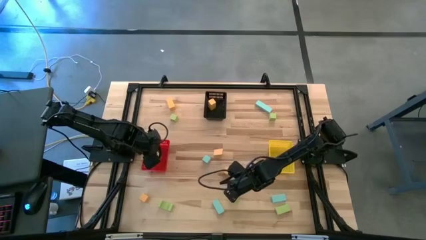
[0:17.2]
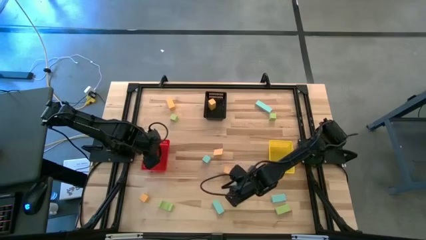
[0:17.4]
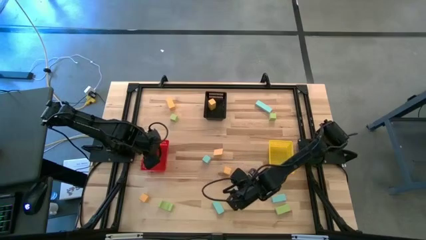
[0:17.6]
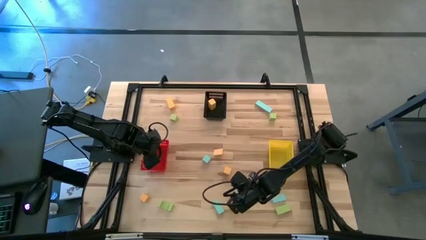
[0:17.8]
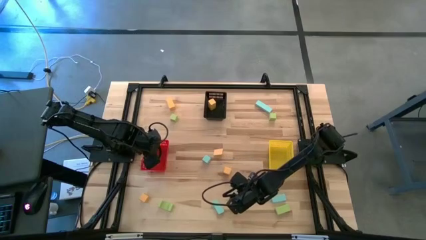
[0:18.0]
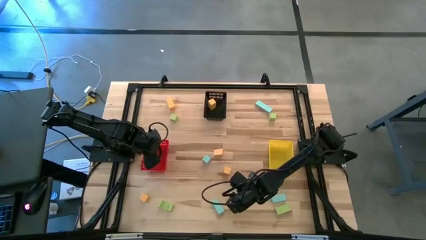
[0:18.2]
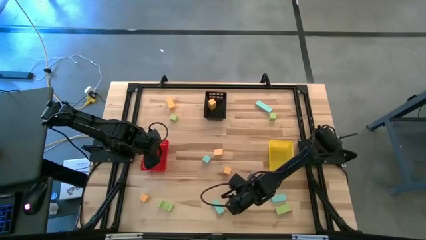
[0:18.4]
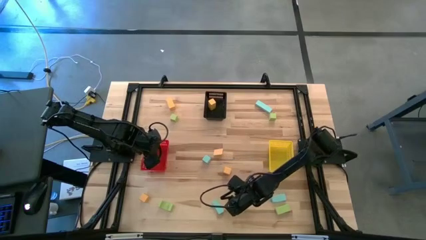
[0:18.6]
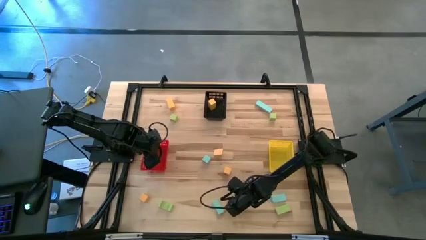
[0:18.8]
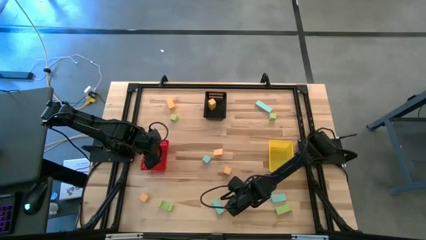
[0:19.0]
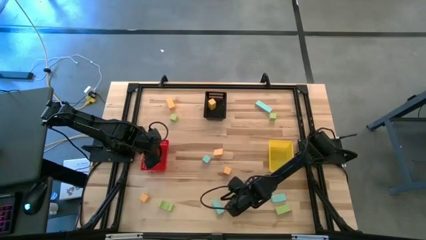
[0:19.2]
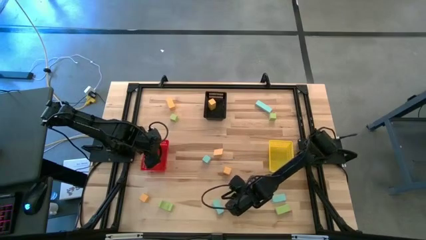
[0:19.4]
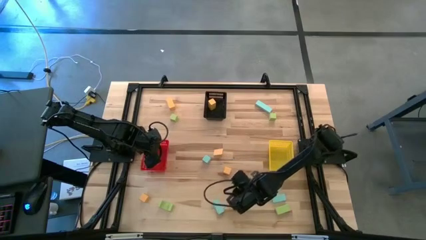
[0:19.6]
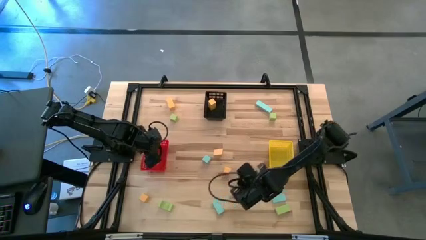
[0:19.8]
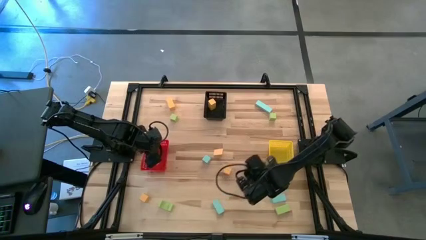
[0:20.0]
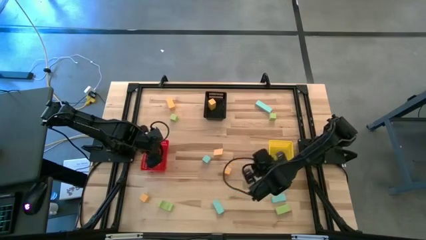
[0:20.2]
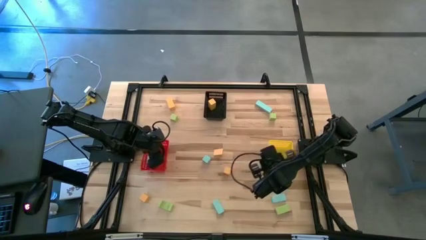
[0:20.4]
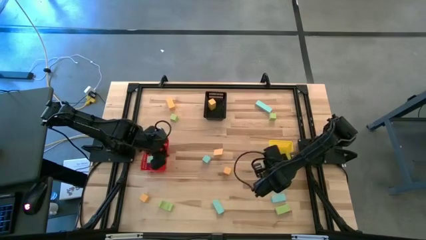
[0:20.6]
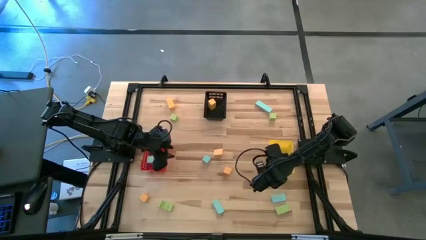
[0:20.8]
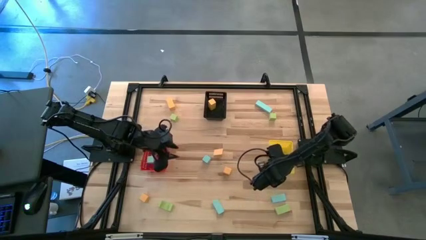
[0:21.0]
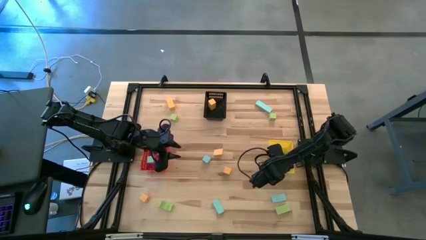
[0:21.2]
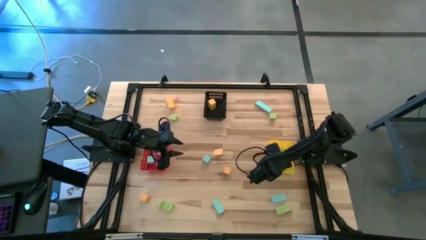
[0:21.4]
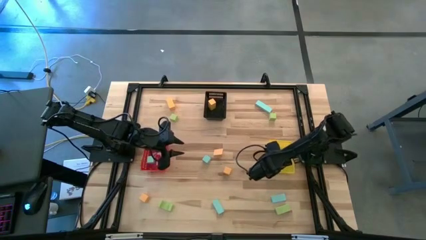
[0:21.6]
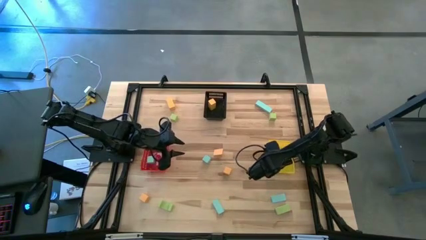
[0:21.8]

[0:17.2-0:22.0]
Task: Sort & place blocks by color
Put the green block into the yellow bin

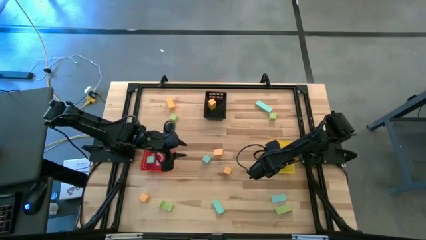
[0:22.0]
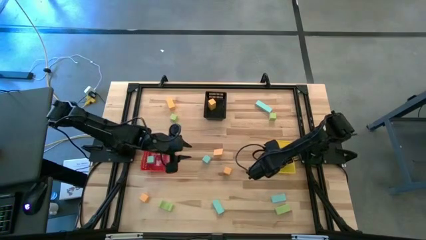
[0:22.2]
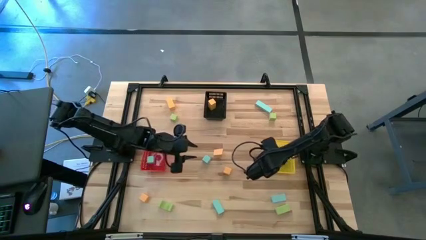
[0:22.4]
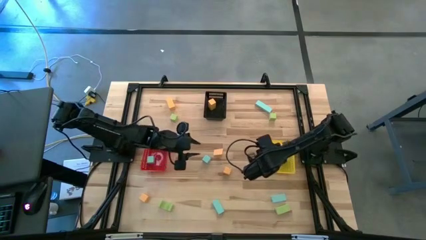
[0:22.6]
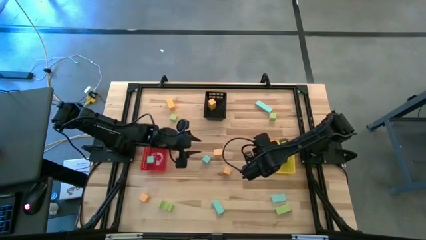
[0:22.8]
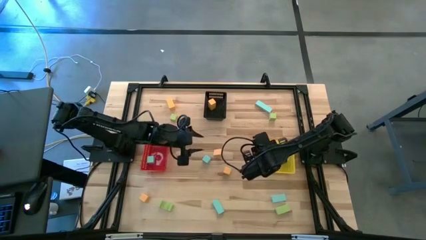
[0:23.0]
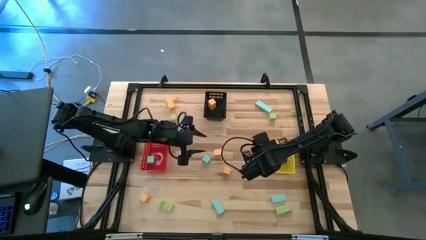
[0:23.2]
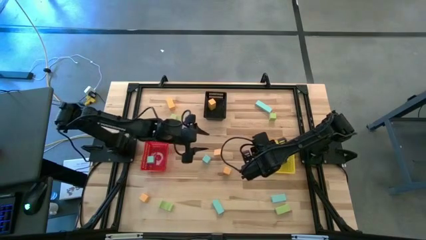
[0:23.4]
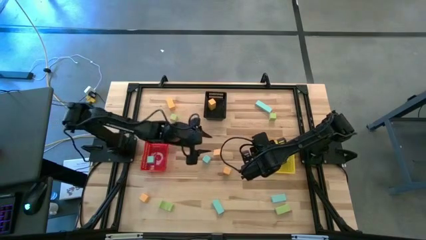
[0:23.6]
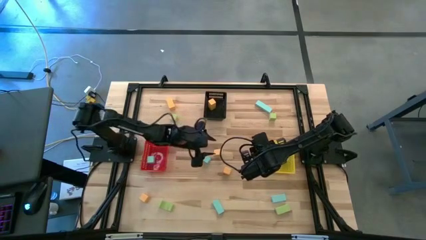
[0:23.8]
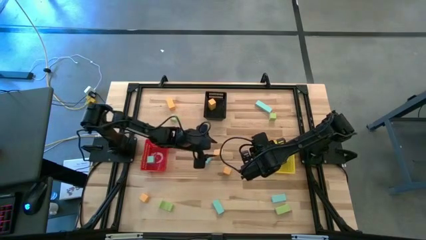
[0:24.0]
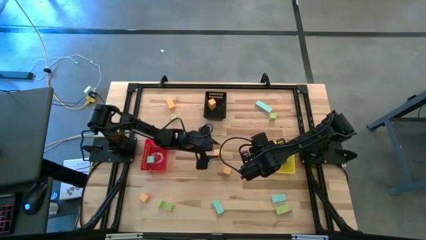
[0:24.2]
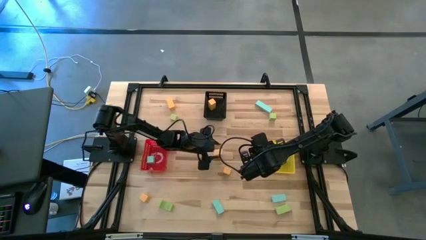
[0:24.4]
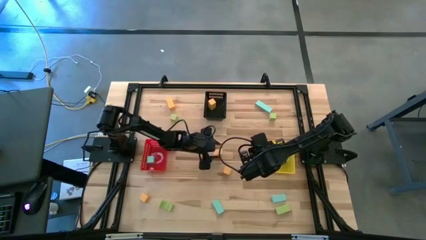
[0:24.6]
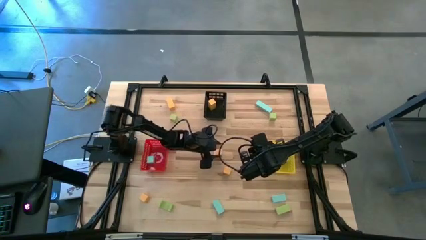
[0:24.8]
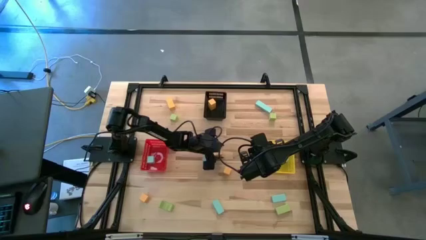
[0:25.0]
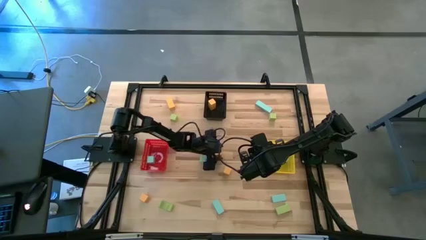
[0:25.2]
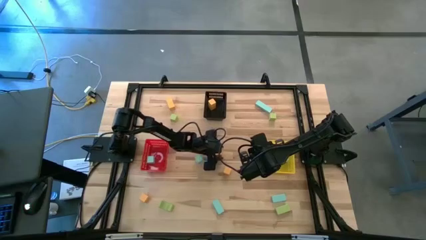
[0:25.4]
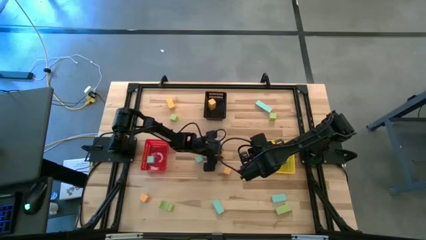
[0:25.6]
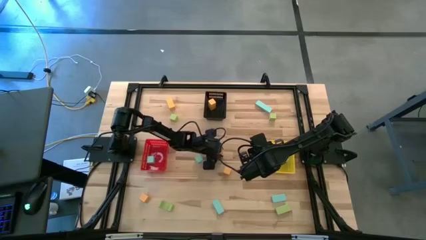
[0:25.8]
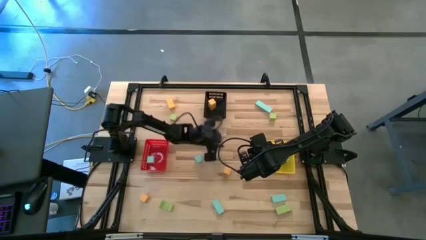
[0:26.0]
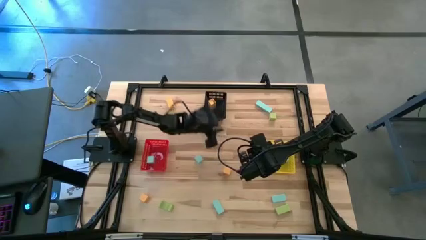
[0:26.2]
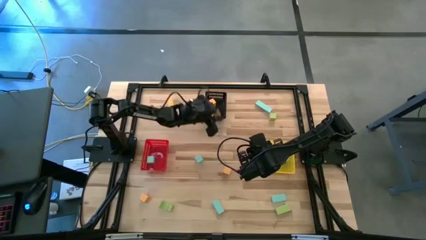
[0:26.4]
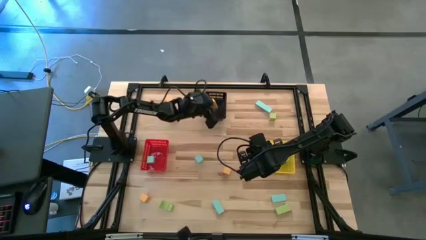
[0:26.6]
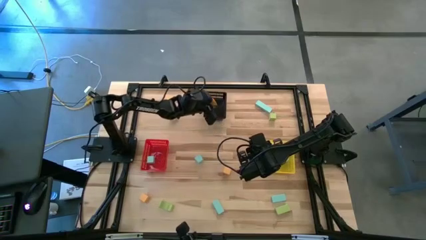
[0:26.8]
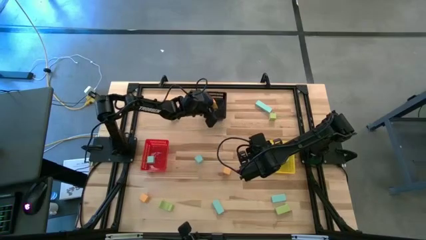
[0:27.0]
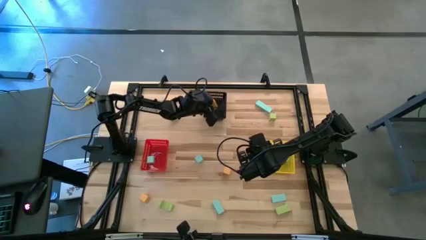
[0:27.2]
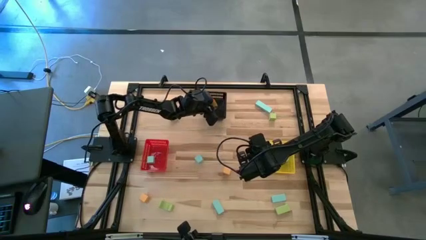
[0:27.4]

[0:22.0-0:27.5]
Put the yellow block into the black bin

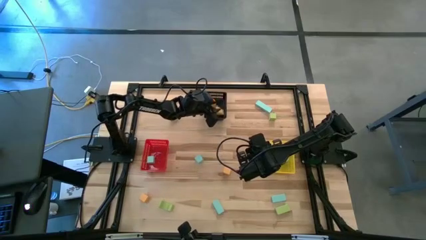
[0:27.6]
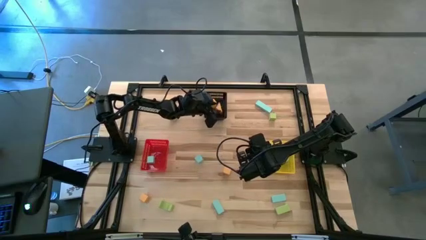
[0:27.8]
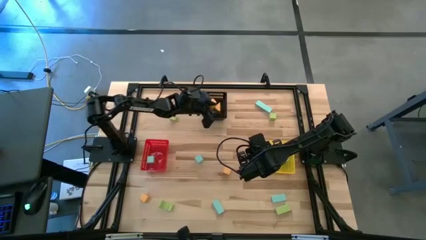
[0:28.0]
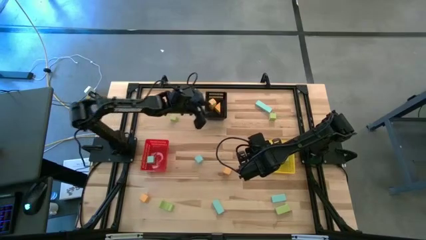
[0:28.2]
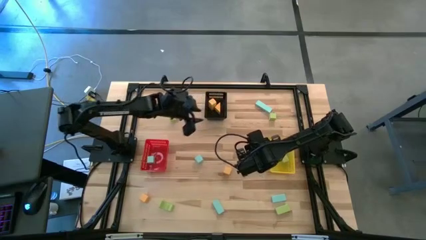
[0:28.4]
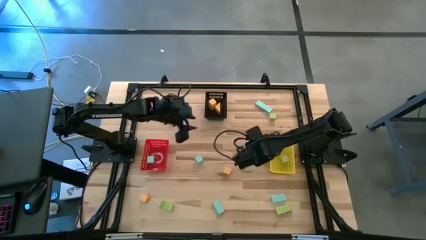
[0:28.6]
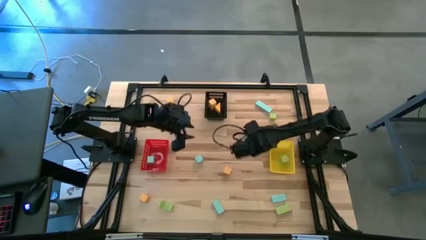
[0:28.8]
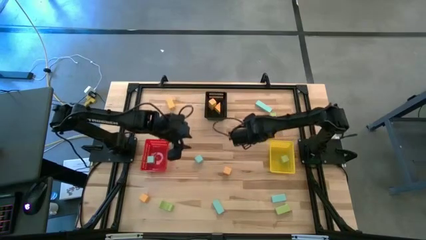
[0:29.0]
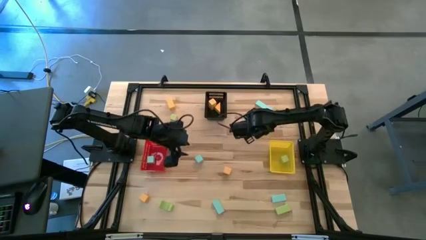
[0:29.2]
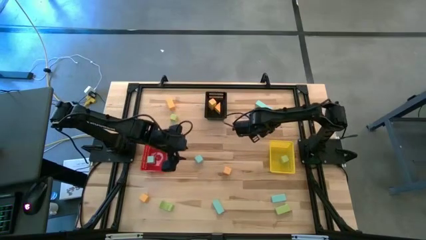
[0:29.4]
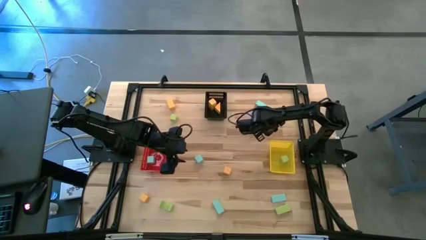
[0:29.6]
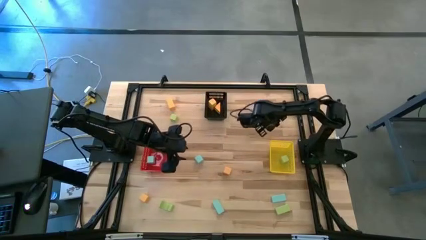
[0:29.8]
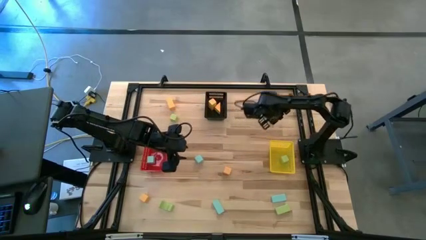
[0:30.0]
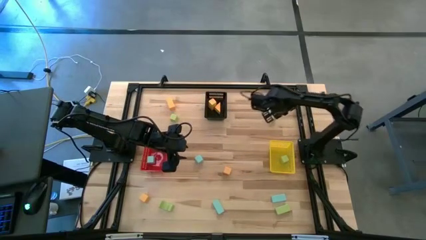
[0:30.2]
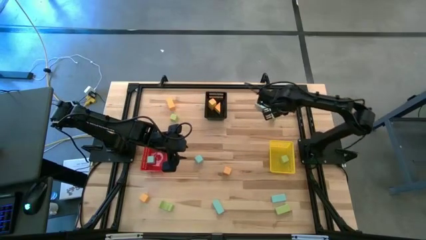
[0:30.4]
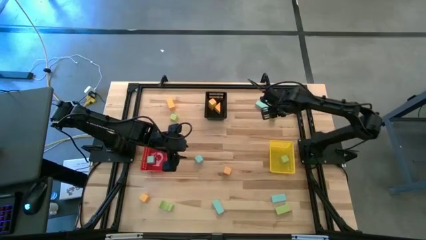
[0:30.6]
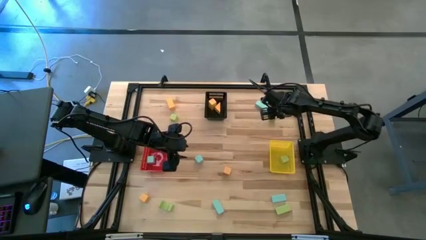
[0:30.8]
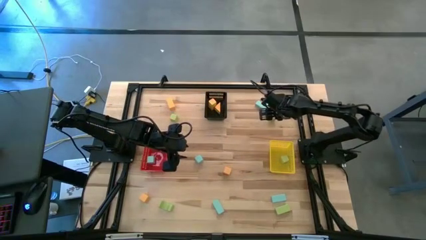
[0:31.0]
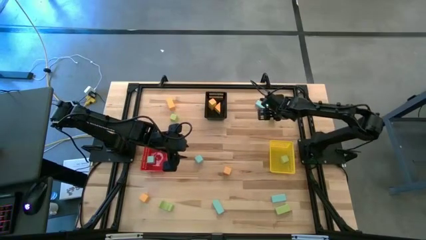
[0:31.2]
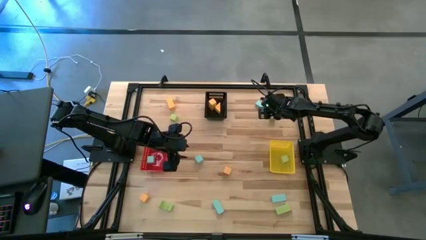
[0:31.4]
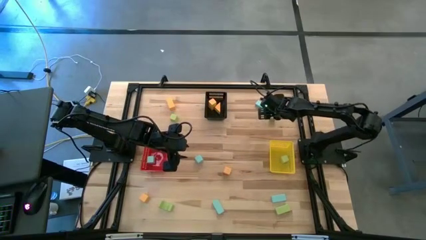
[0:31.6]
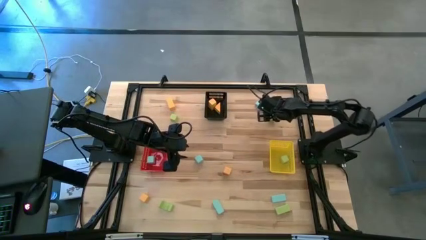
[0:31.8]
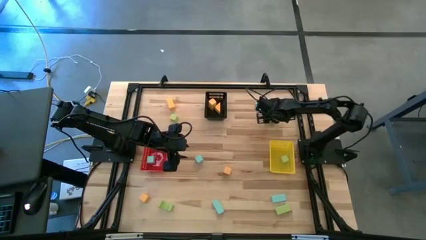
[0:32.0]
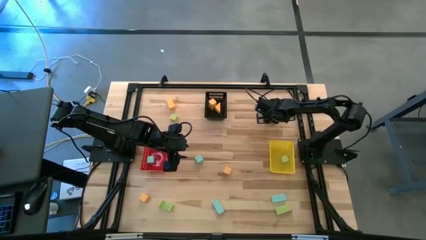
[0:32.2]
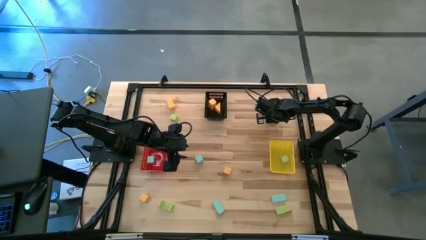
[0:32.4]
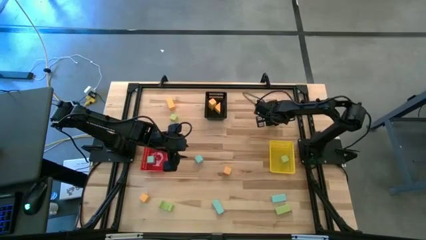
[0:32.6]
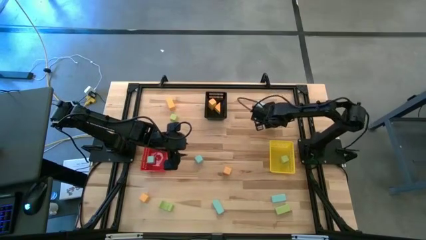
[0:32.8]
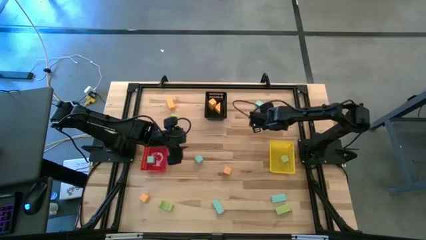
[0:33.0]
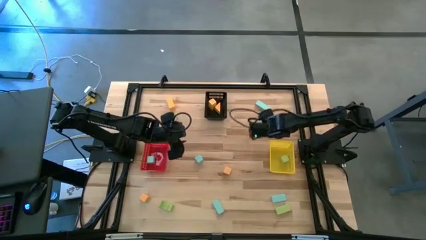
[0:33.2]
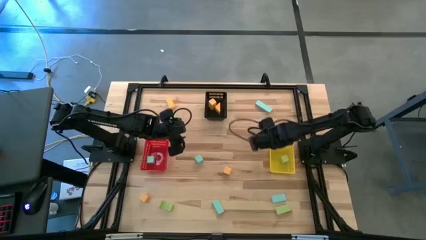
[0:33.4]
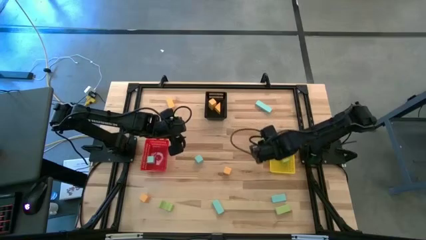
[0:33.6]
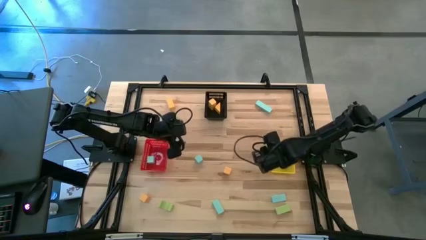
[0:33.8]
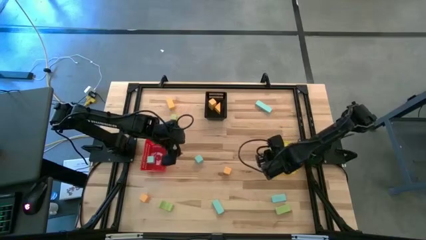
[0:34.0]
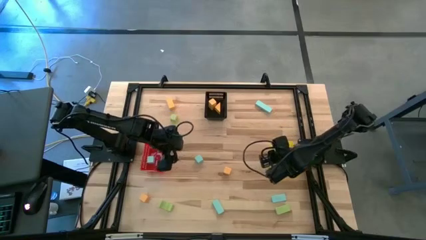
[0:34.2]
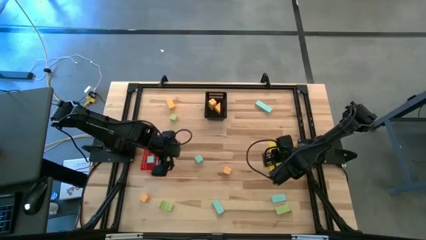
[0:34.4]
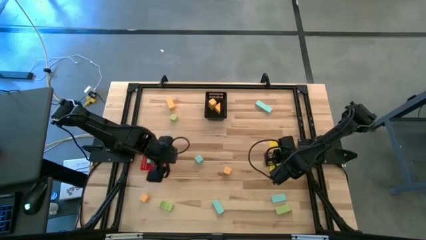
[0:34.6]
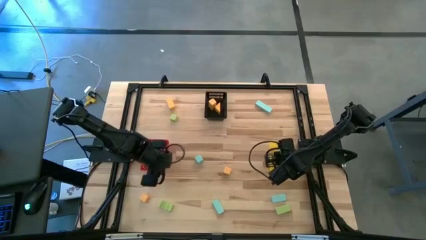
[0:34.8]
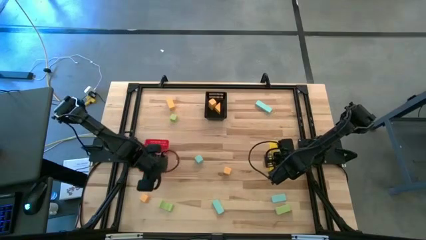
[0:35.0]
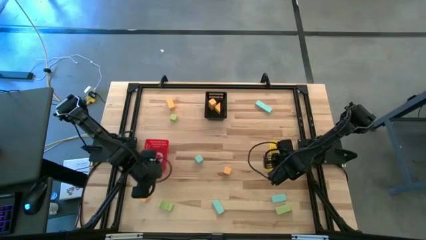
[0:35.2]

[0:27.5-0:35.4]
Put the green block into the yellow bin
